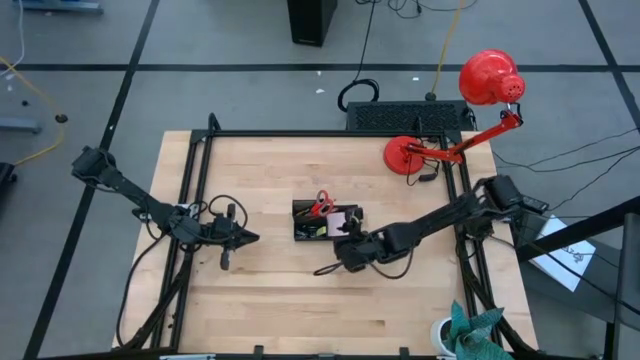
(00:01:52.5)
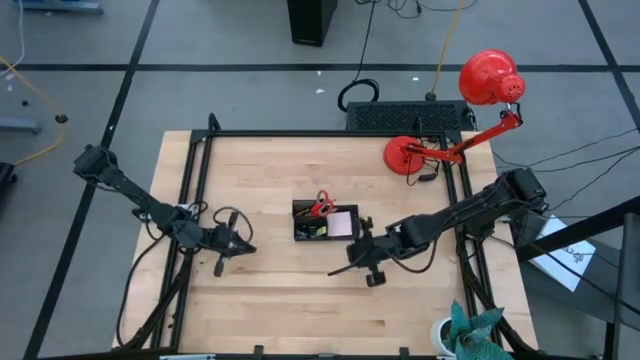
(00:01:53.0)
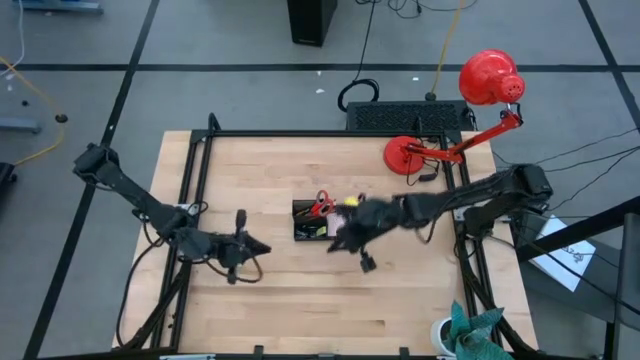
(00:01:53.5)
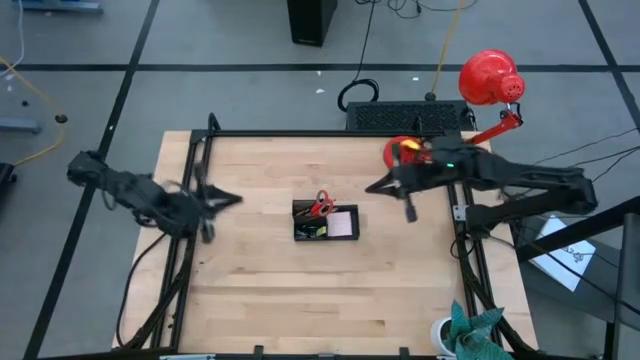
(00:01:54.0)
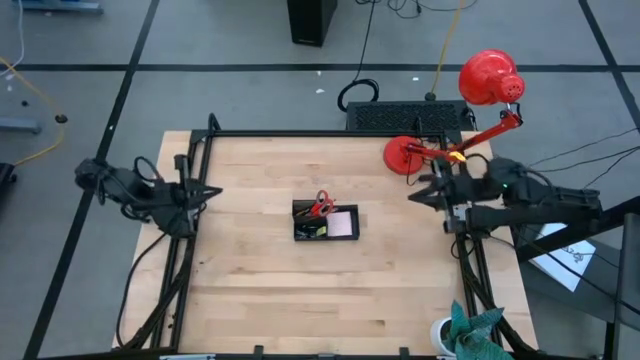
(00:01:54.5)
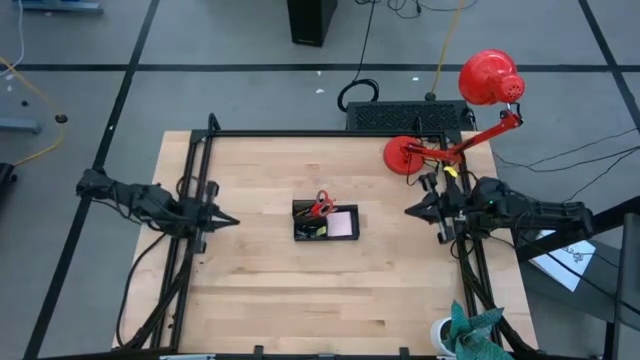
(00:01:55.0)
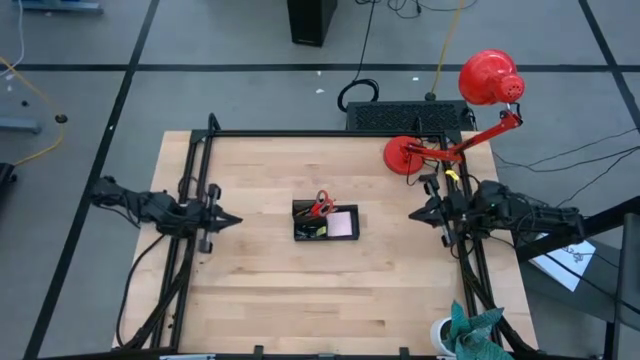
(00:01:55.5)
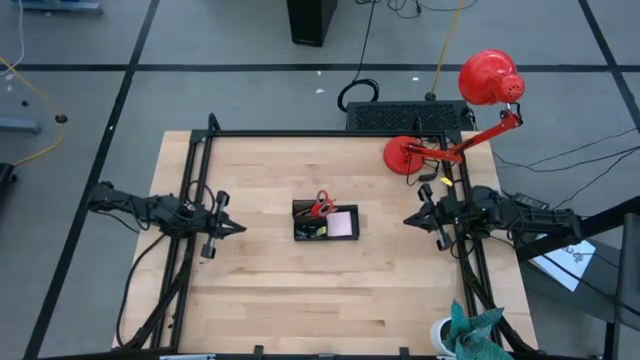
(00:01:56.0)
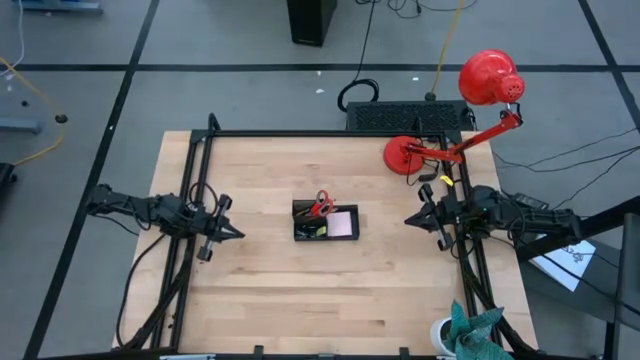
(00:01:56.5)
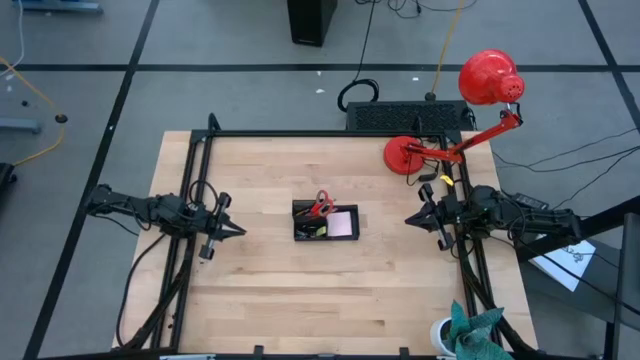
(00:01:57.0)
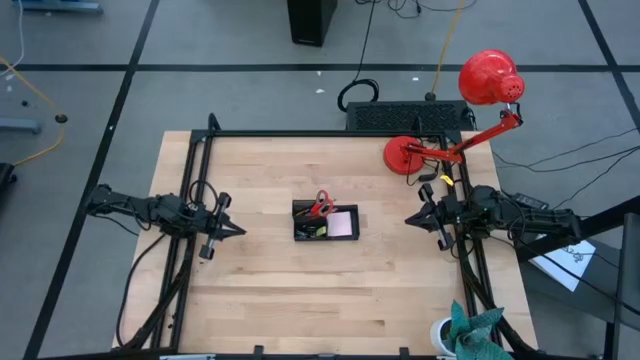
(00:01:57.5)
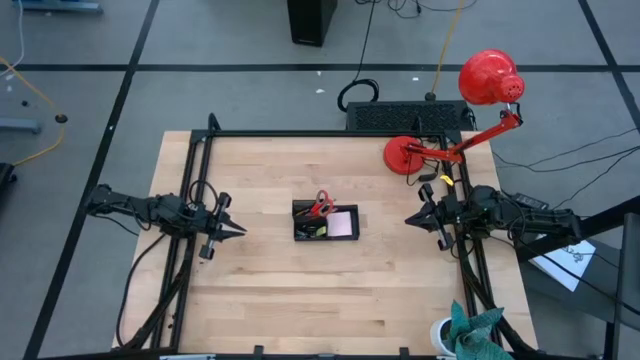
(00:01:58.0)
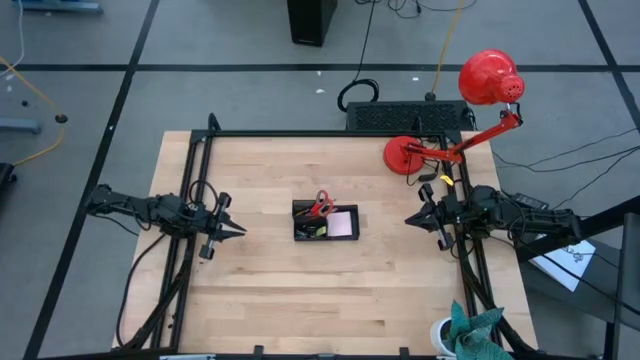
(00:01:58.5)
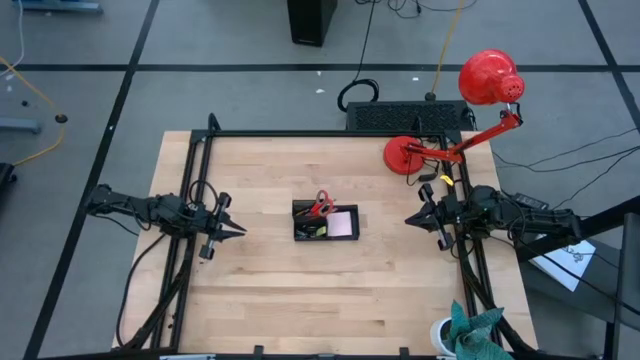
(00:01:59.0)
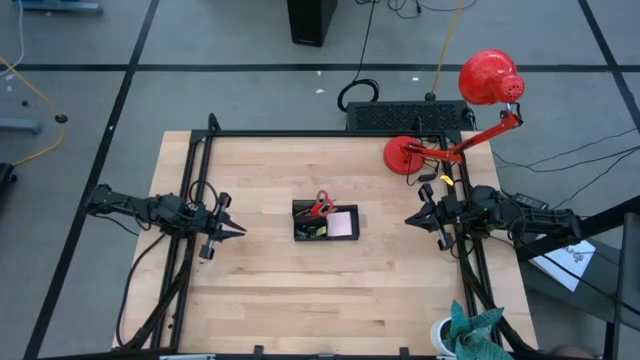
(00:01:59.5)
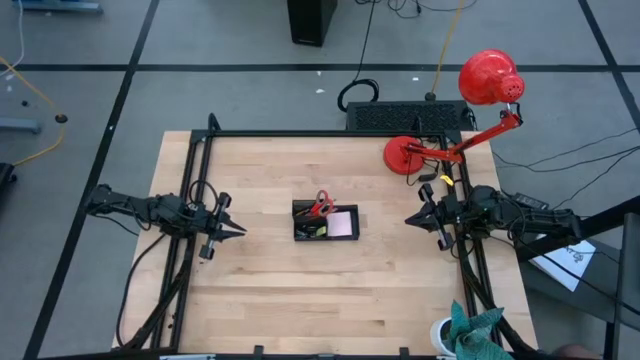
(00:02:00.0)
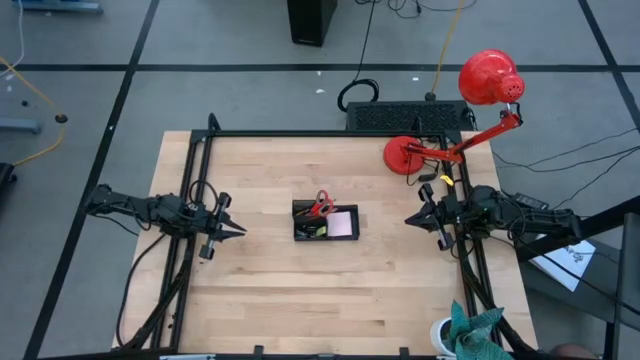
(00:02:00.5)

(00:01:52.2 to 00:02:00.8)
Task: Pick and place office supplies into organizer
Return to Home Position

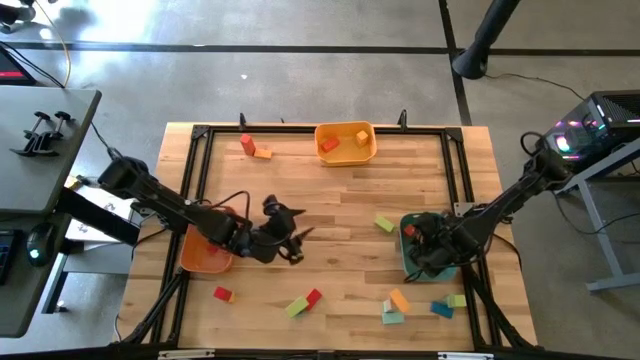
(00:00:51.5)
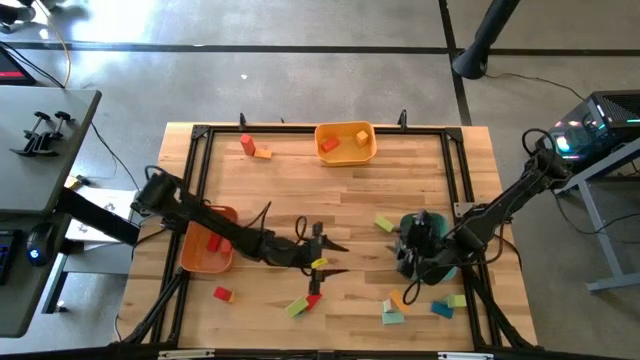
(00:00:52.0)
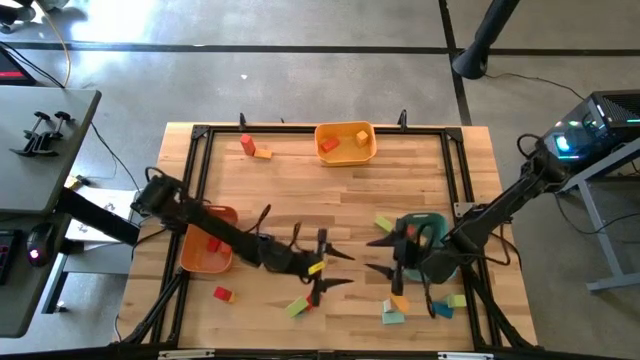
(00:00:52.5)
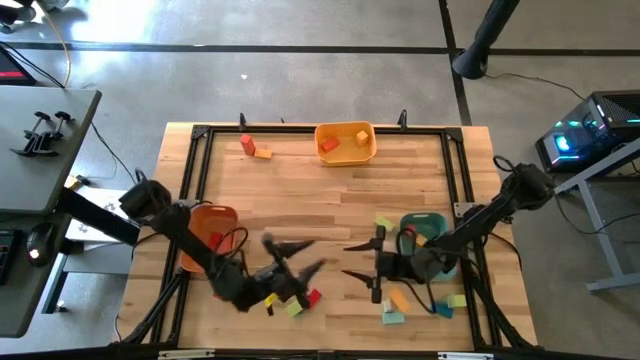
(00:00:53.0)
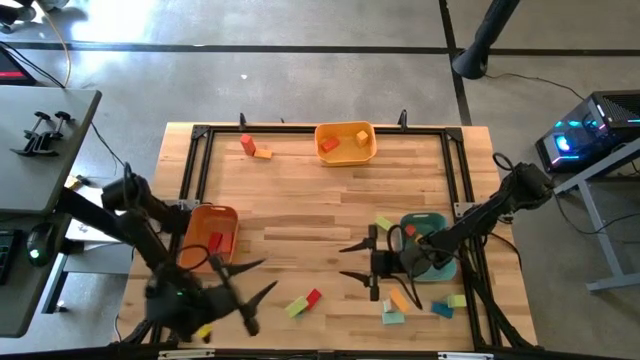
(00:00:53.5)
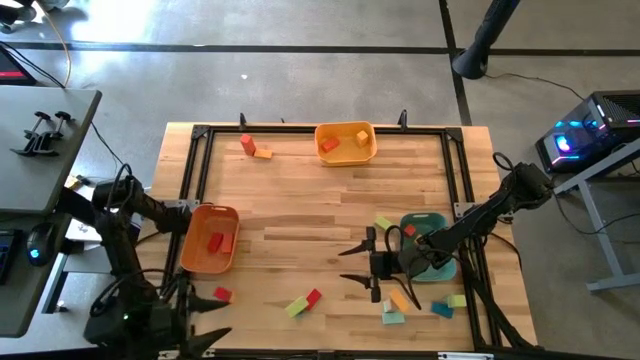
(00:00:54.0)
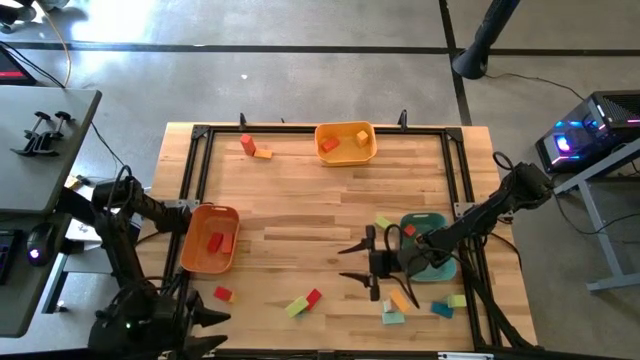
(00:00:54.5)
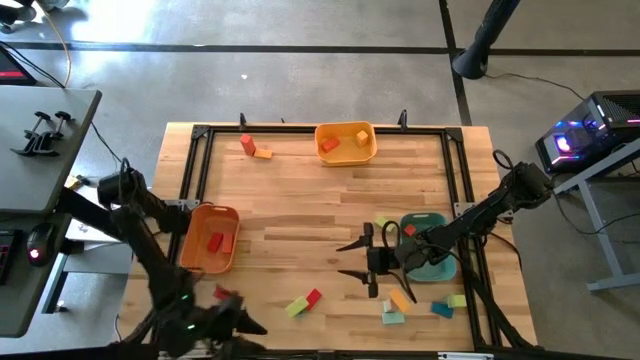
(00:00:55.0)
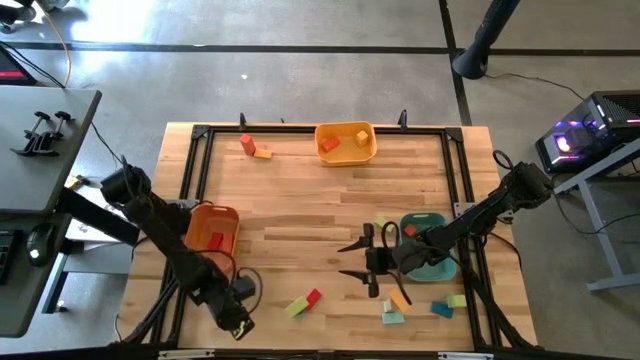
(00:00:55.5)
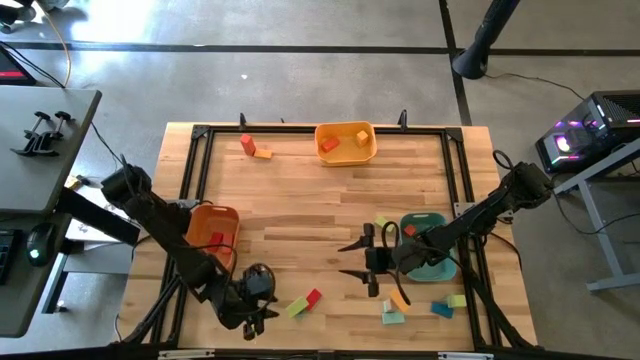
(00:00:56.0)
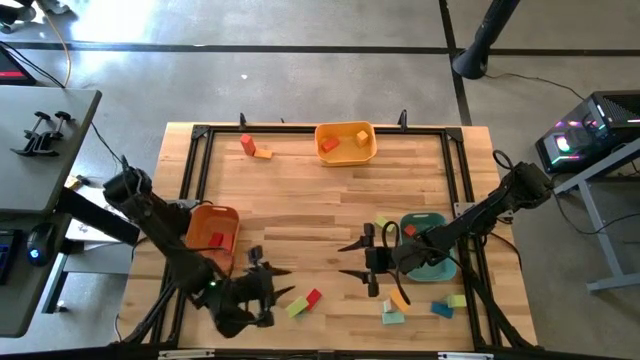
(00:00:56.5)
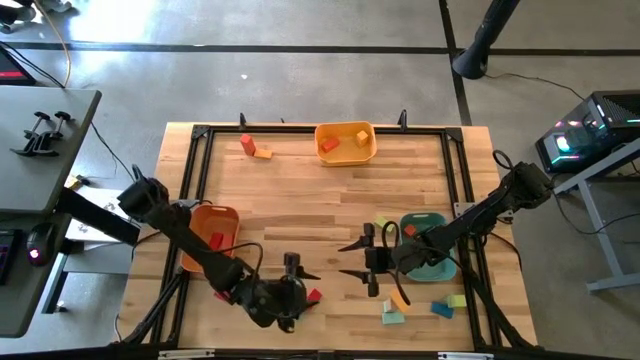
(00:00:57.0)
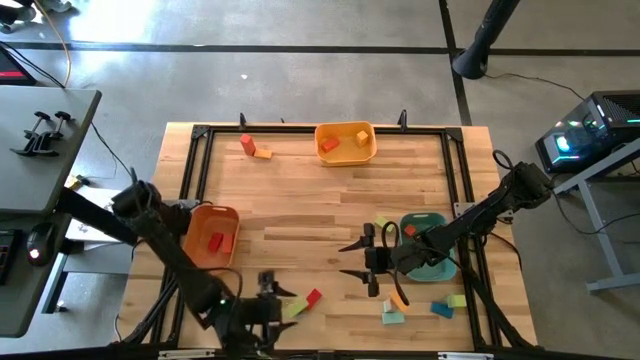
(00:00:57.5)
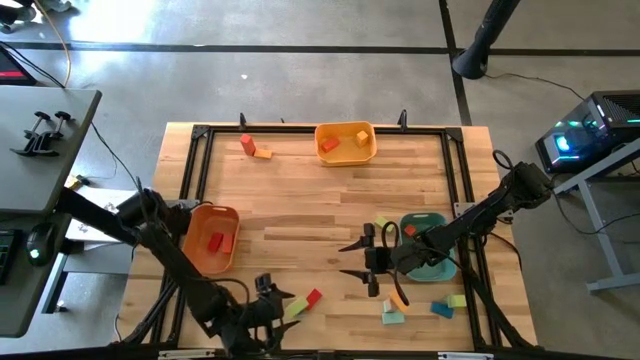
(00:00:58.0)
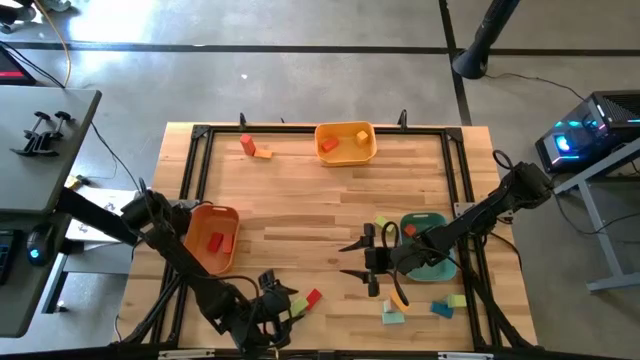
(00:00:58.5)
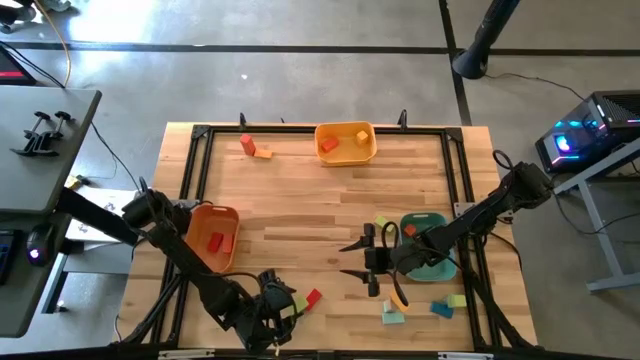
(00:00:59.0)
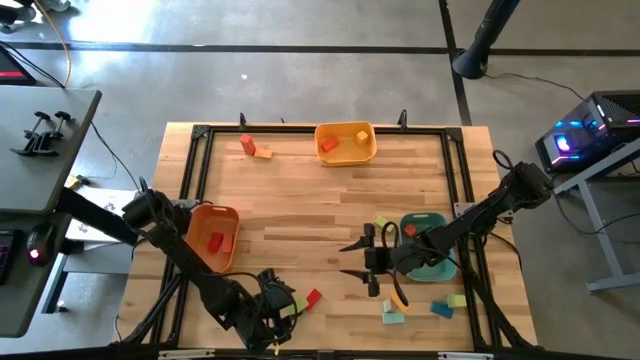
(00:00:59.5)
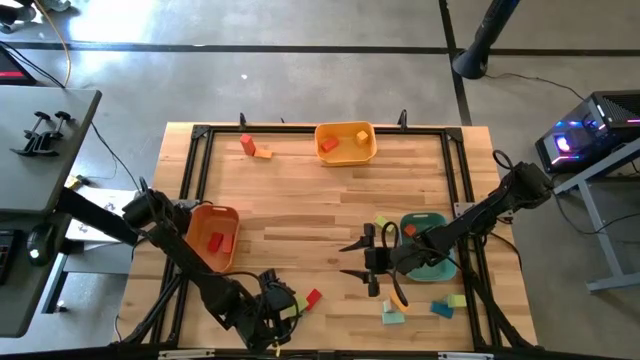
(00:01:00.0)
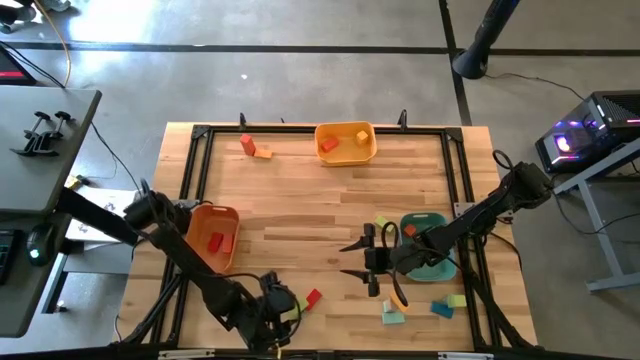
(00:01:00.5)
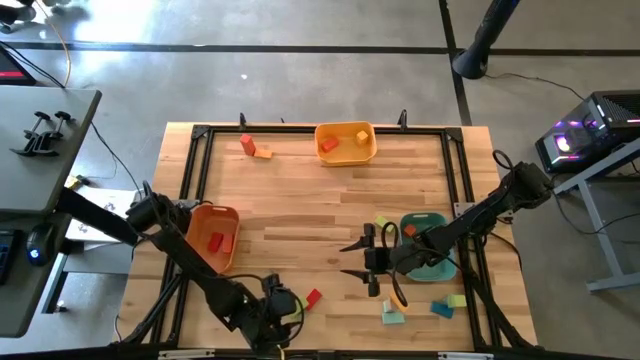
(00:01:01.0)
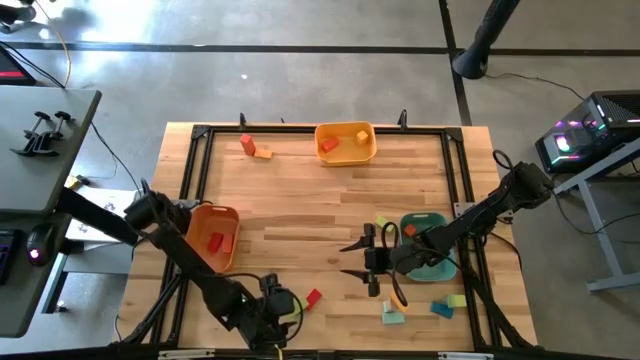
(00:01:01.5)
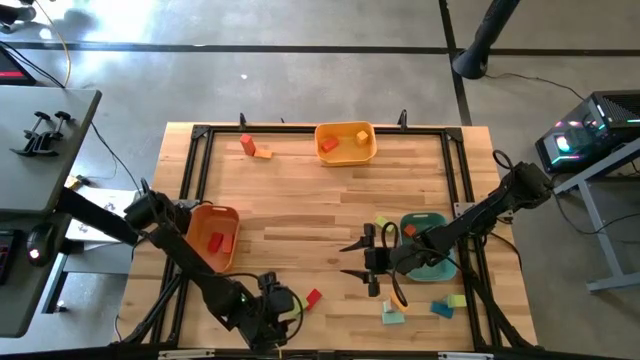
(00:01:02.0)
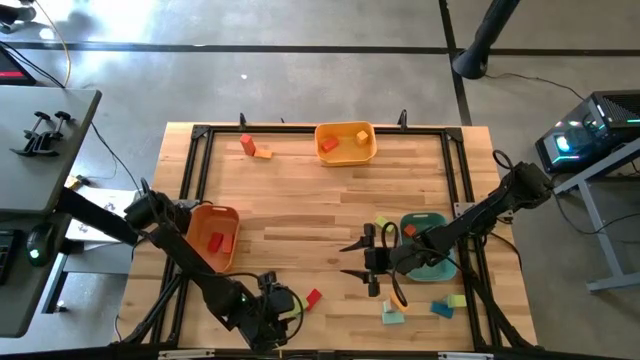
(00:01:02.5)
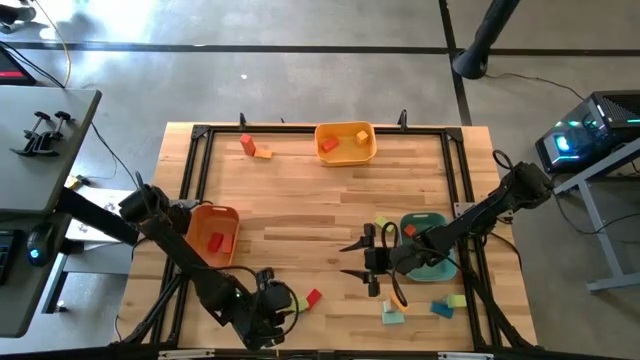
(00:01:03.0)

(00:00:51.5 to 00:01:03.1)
Task: Sort blocks by size
Put the green medium block into the orange bin
